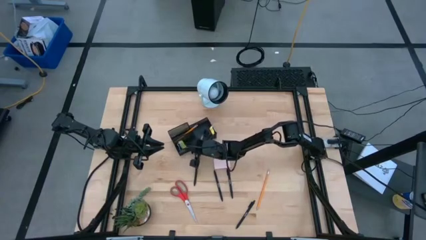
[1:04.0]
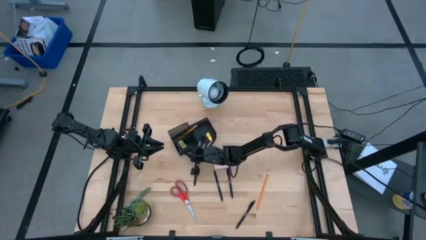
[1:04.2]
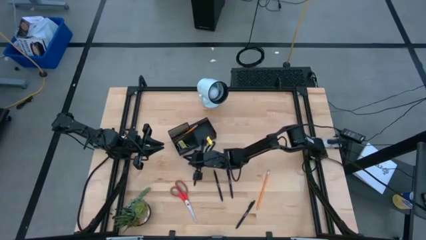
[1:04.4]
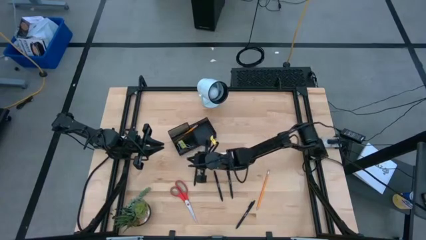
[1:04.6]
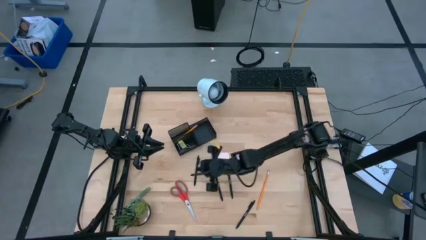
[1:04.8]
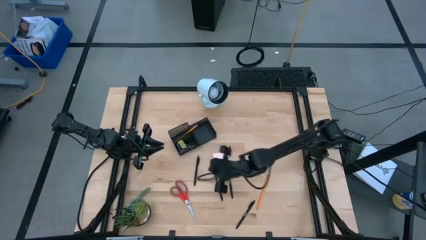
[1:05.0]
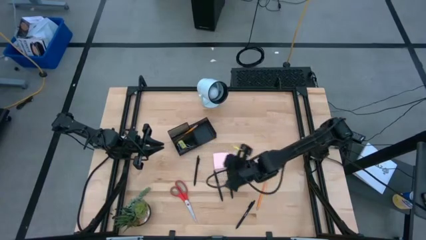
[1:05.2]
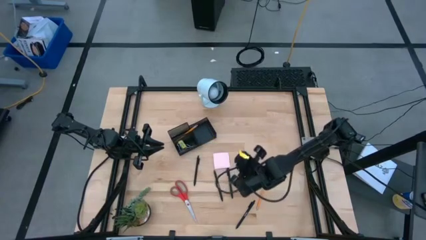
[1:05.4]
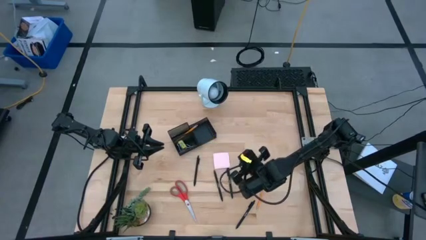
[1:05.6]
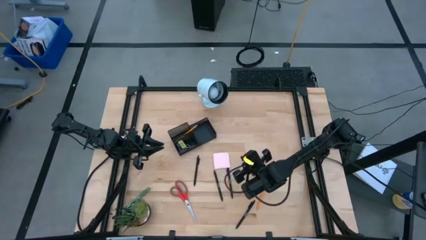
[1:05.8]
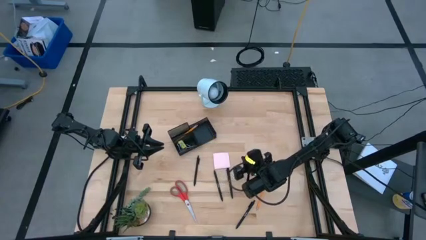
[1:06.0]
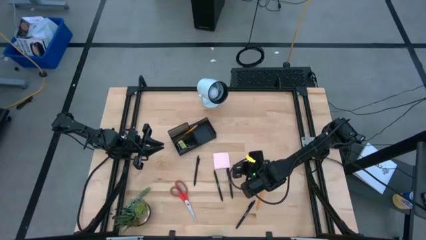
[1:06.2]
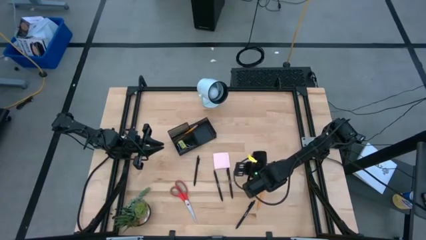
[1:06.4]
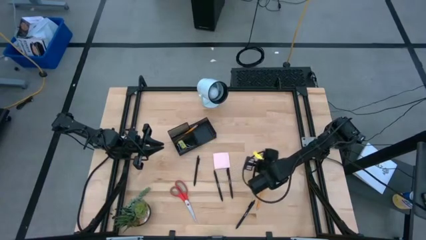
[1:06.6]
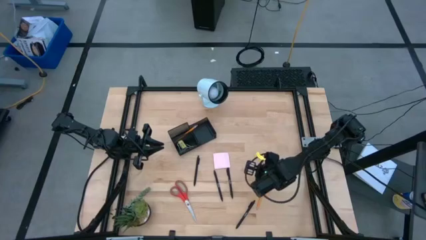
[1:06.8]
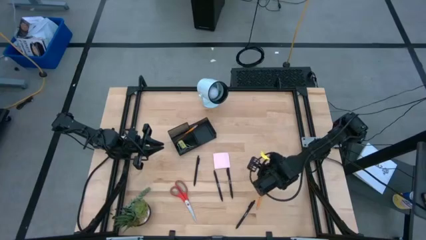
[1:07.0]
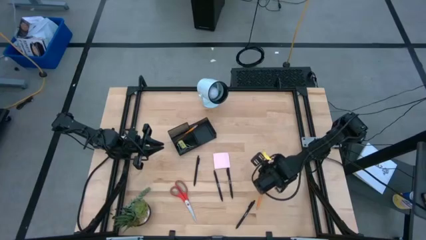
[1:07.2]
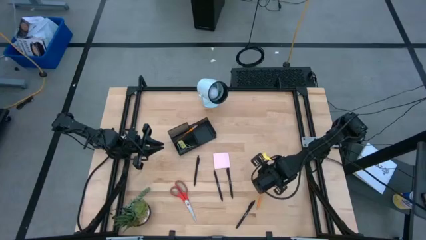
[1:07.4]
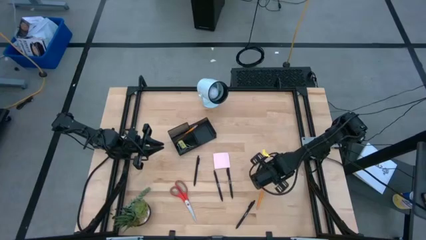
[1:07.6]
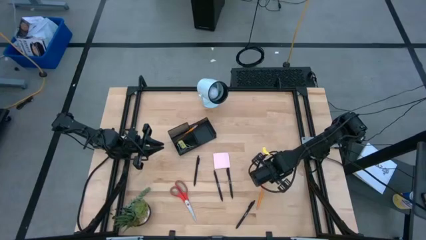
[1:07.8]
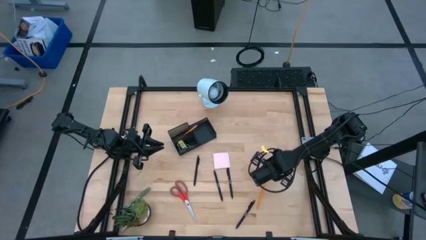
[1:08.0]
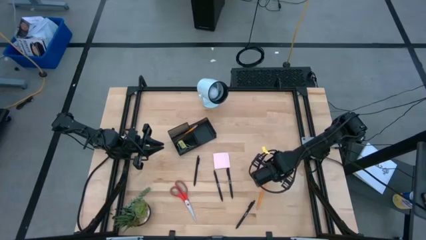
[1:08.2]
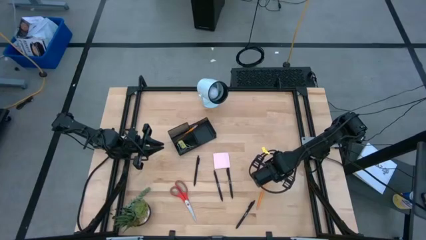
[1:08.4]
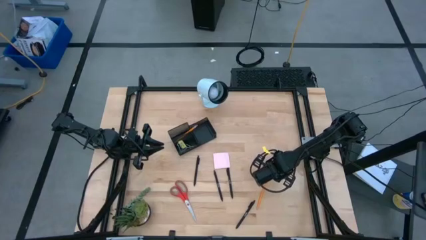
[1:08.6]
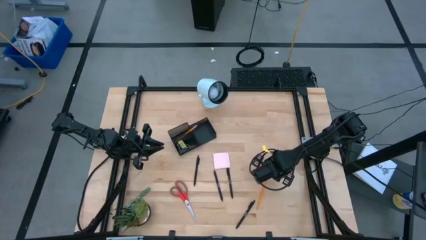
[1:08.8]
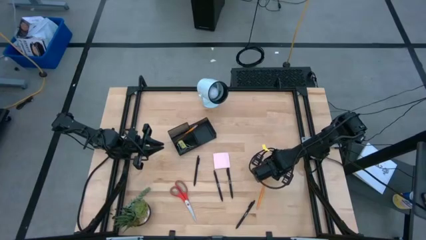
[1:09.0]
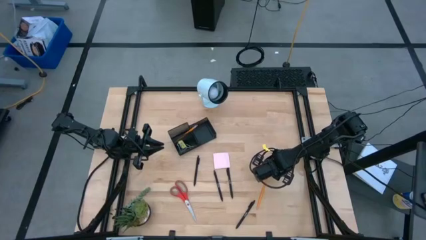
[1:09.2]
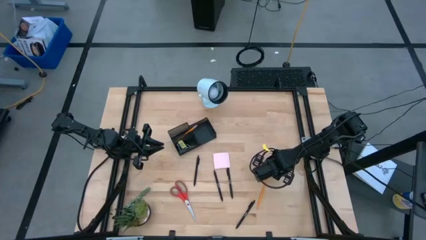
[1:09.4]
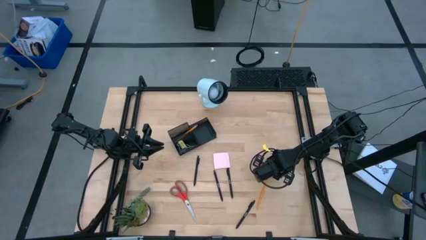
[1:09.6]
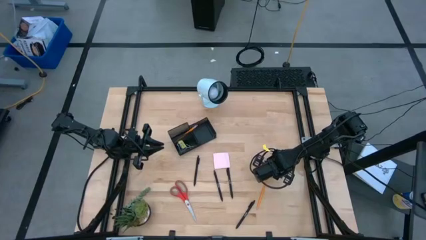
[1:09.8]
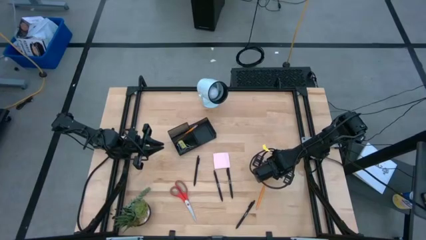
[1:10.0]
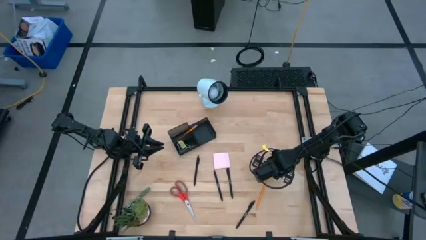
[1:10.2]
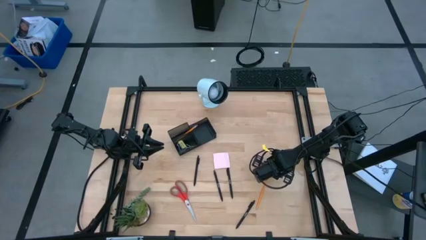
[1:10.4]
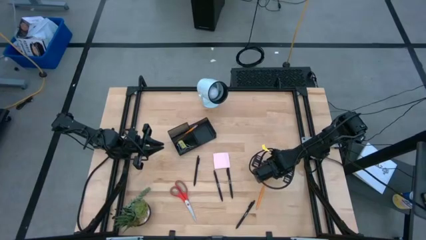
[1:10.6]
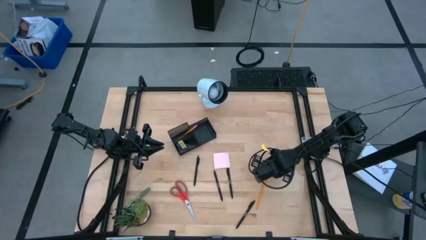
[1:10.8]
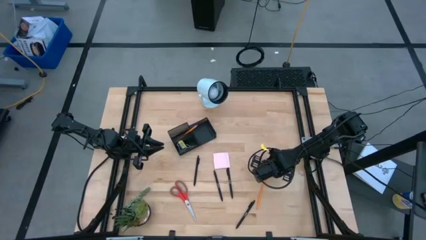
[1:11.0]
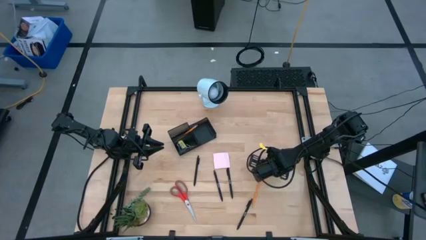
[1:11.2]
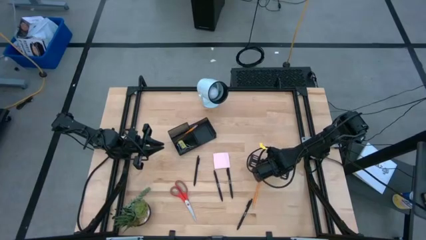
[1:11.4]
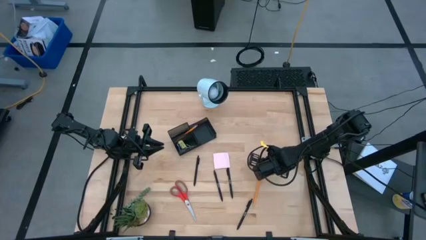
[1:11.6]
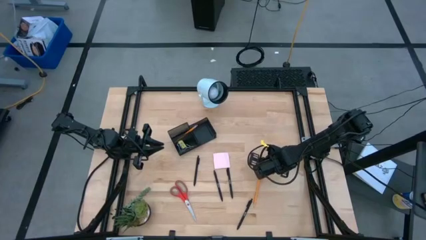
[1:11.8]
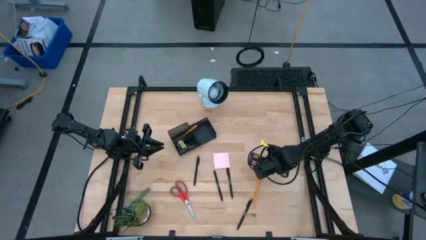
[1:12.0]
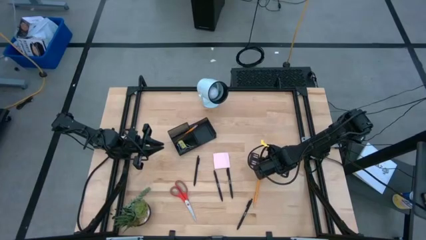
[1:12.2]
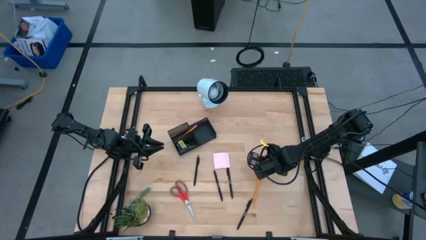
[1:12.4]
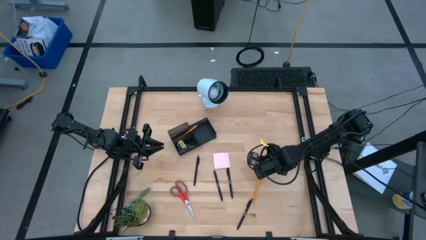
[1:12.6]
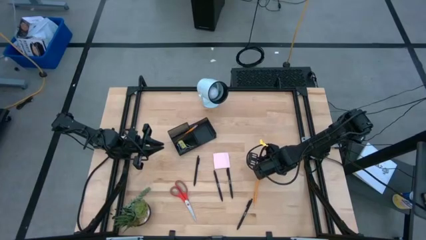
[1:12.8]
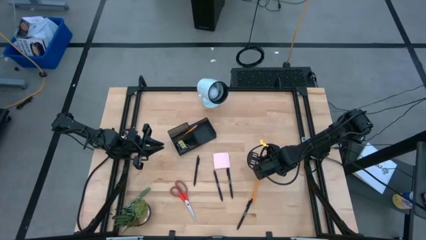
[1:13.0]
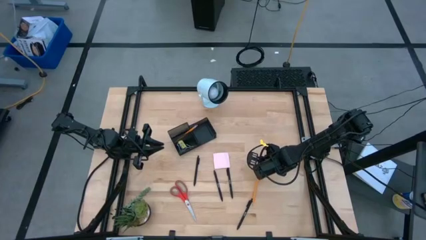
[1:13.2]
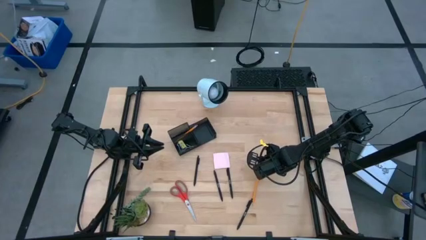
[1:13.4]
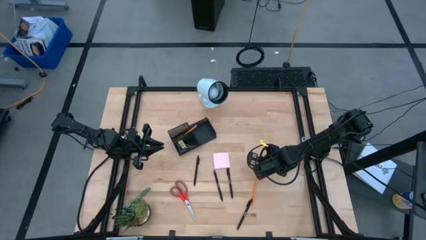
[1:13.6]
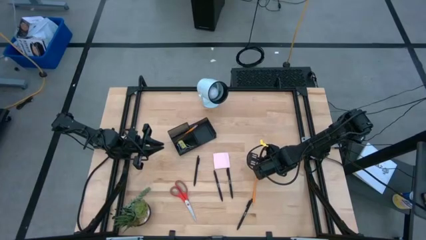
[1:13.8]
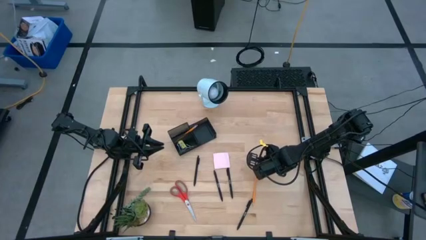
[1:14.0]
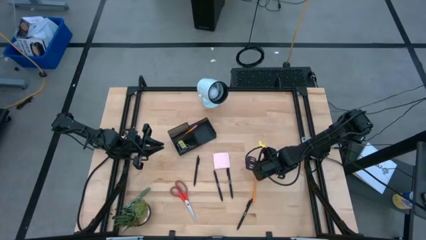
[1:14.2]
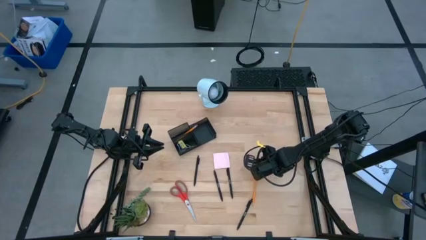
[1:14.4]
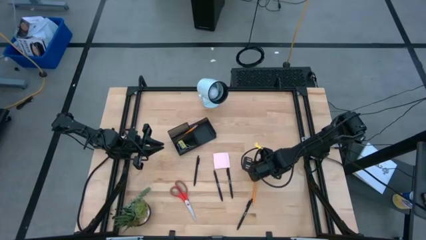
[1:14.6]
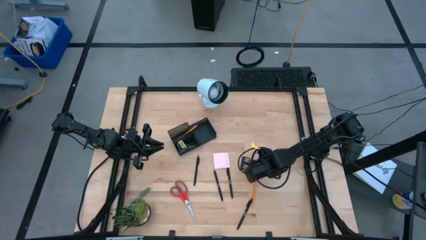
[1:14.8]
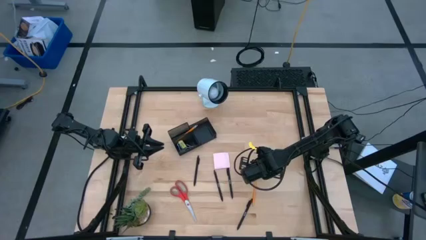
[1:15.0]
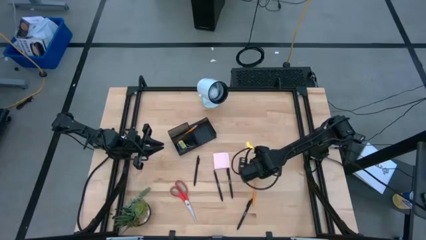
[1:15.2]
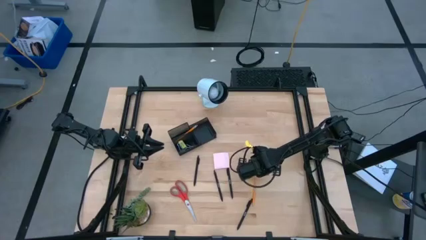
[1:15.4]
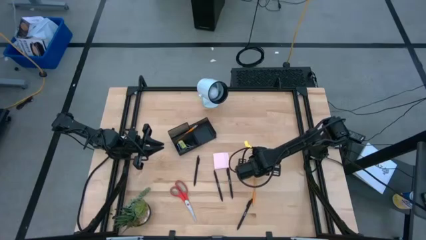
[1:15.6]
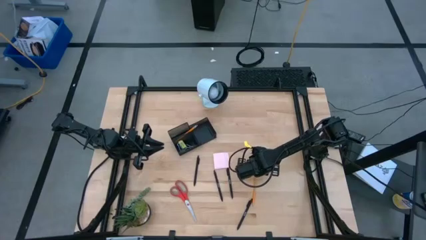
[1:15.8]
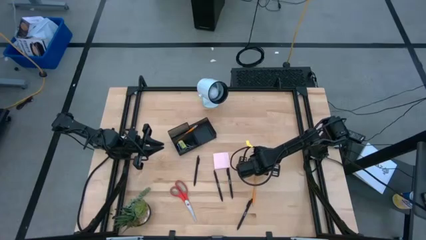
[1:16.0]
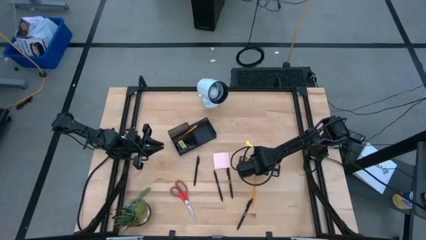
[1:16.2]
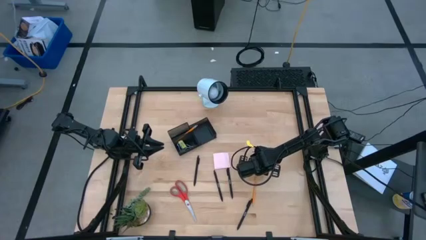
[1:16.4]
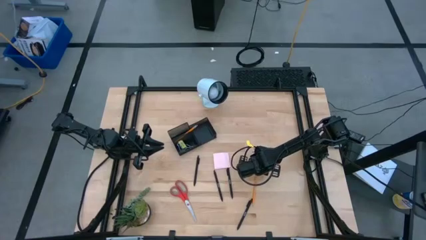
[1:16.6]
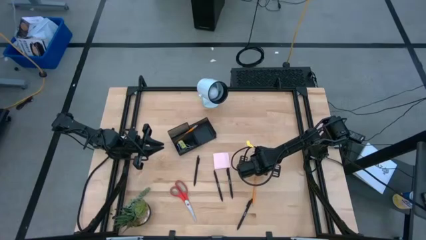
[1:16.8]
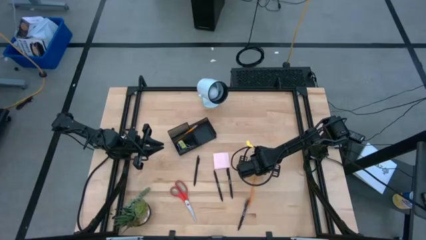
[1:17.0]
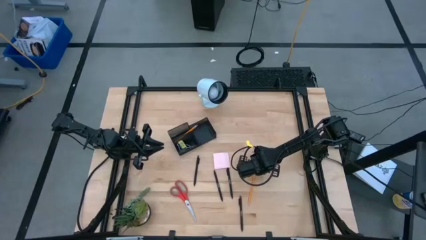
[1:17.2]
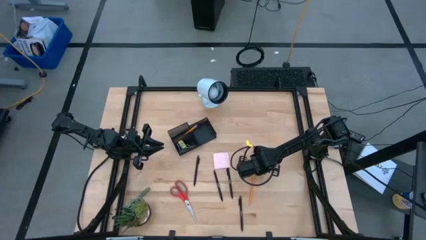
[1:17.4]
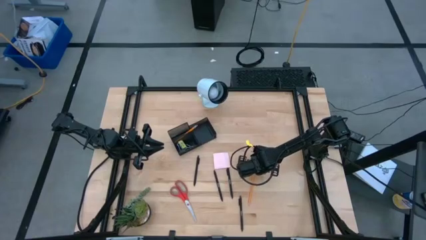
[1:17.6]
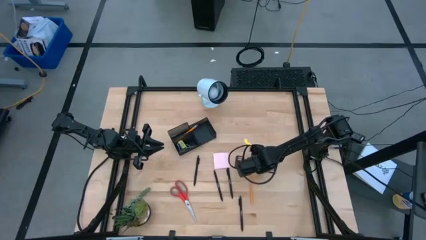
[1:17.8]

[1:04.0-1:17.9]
Task: Pick and place office supplies into organizer
Put the orange pencil into the black desk organizer

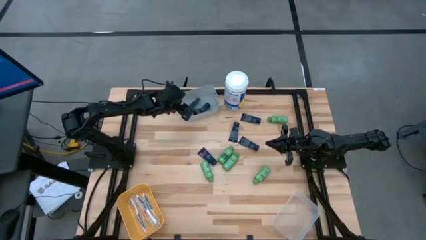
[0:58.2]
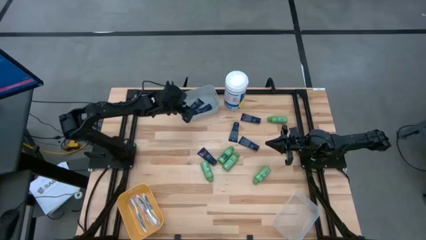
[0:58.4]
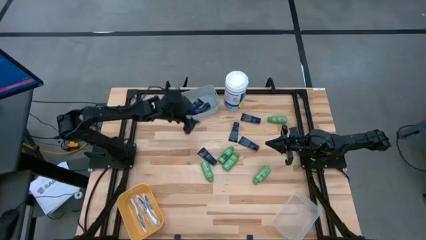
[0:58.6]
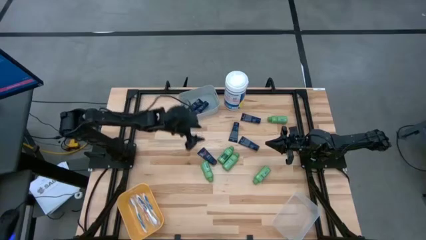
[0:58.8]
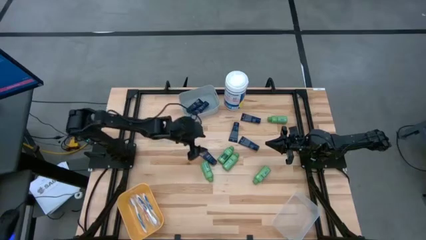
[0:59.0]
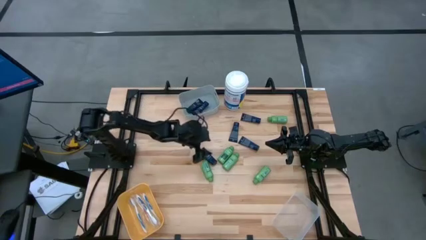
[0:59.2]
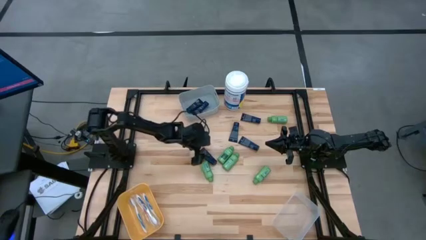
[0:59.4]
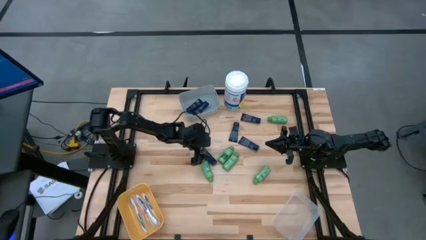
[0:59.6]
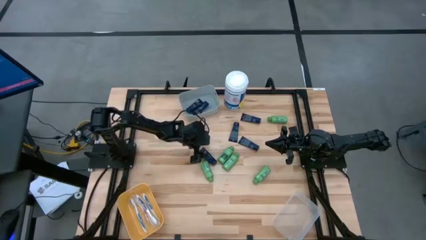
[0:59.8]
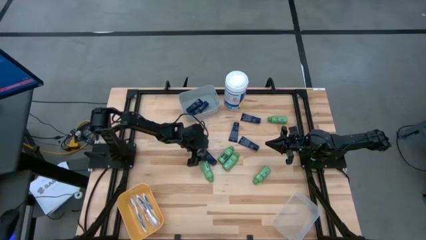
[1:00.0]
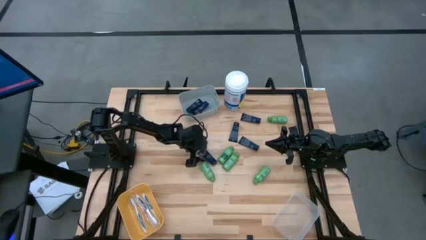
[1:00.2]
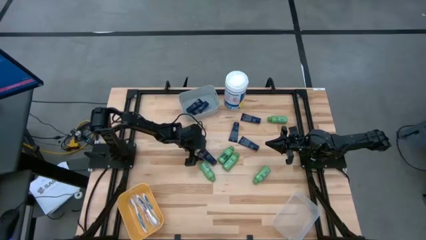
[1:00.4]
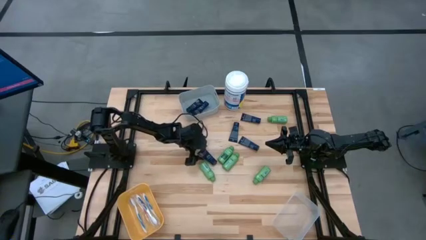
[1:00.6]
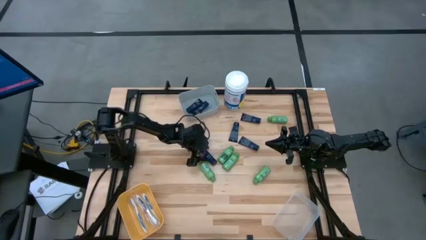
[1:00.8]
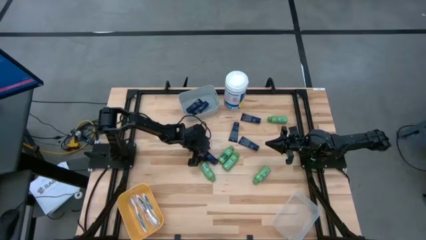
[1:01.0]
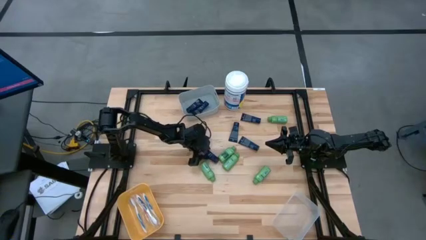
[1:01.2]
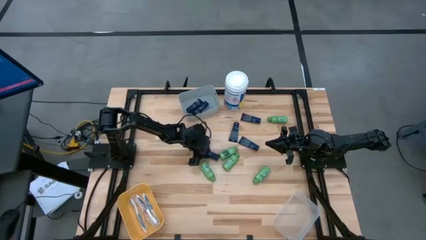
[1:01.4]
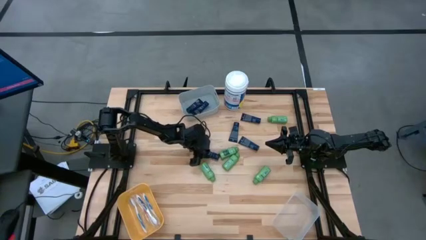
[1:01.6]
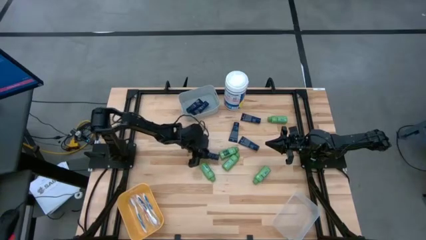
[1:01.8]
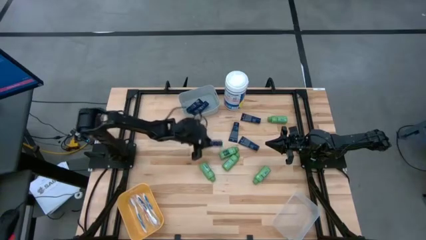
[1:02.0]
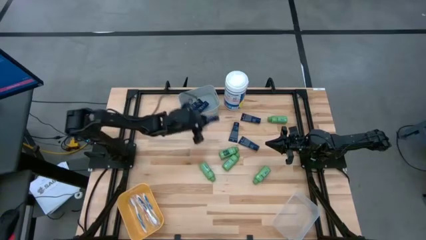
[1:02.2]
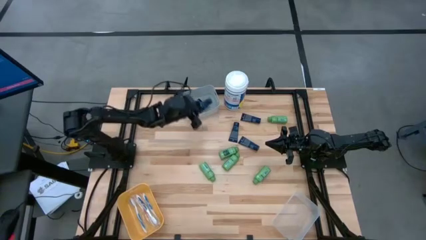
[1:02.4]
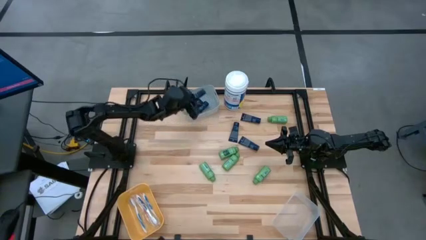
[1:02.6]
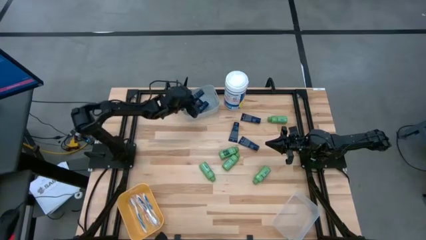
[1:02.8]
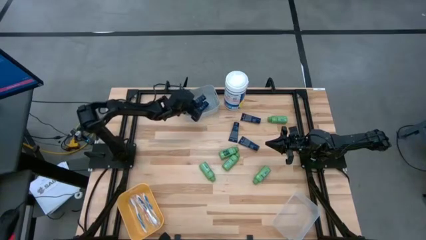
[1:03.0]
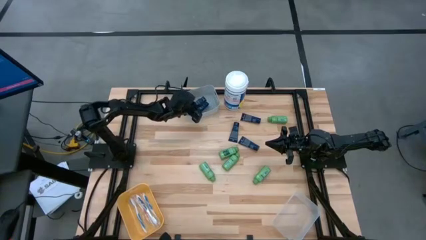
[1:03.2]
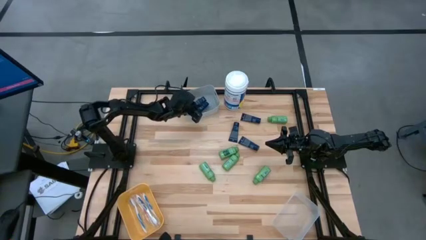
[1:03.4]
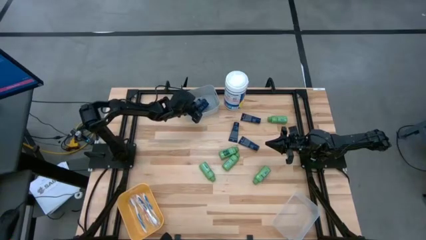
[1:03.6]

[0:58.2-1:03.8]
Task: Pick & Place Travel size toiletries
Put the dark blue shave cream into the gray bin
